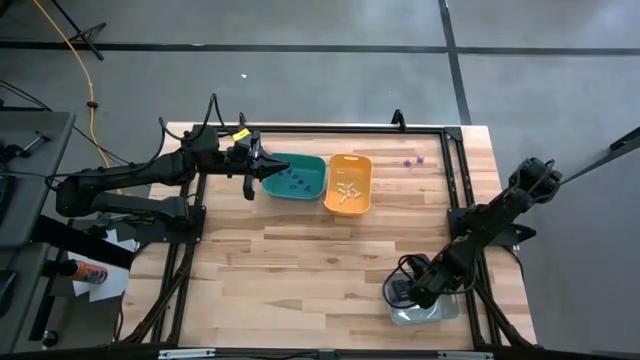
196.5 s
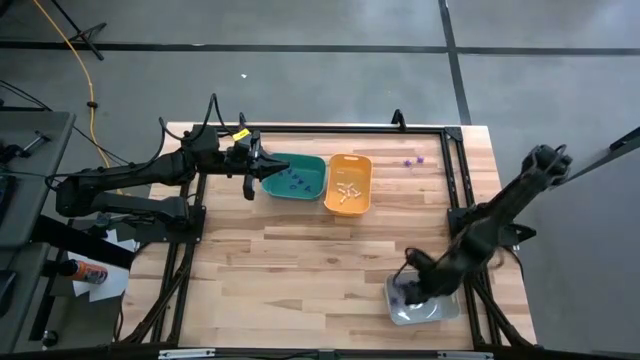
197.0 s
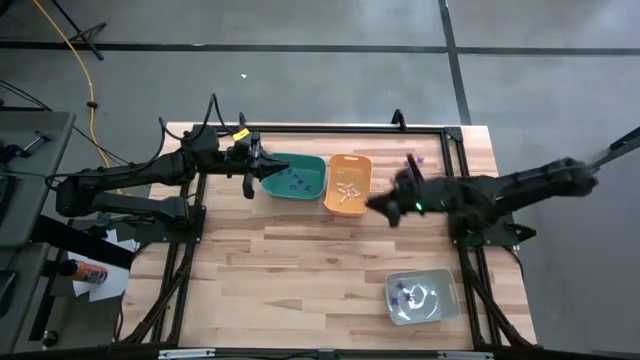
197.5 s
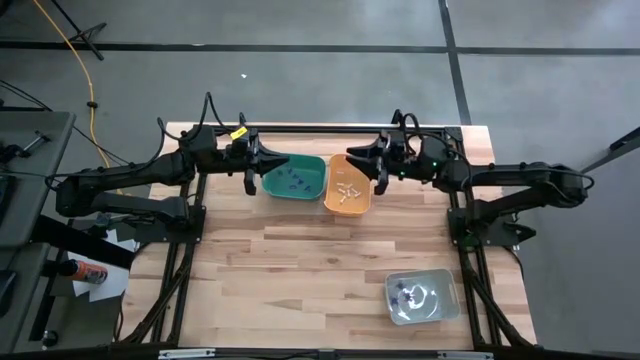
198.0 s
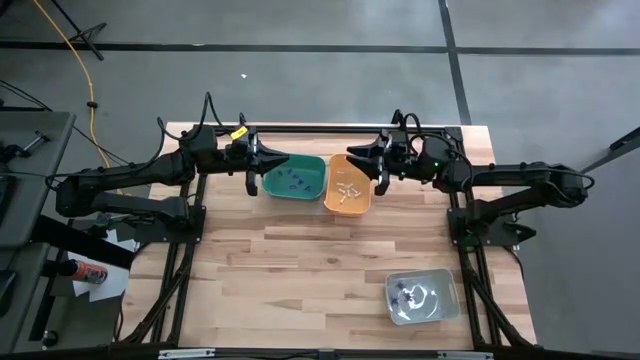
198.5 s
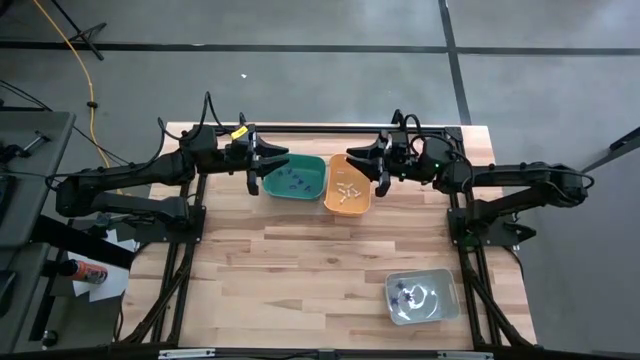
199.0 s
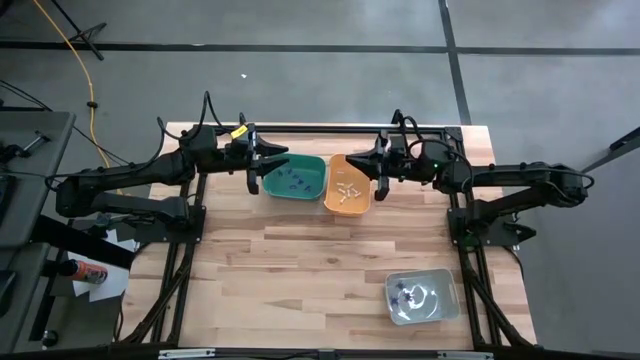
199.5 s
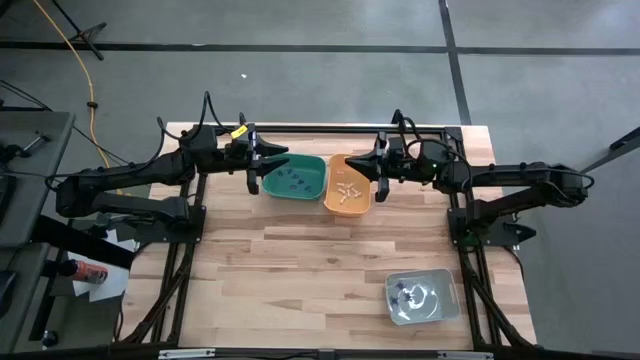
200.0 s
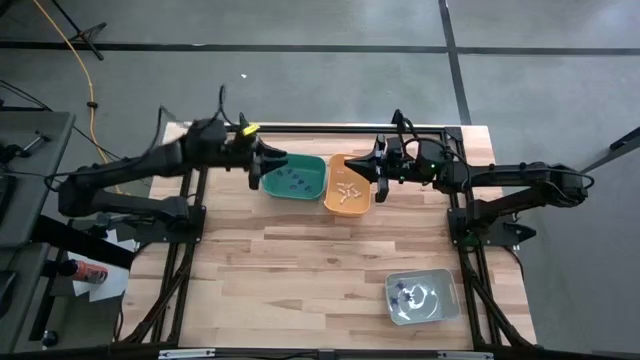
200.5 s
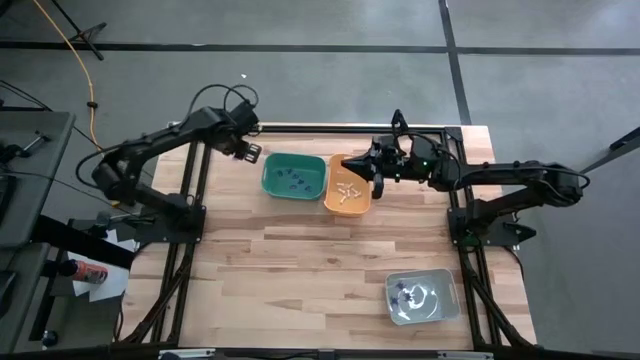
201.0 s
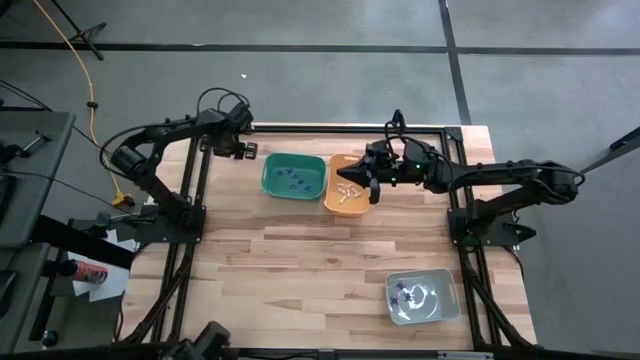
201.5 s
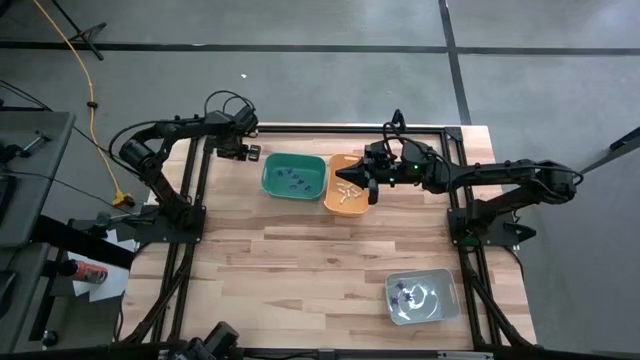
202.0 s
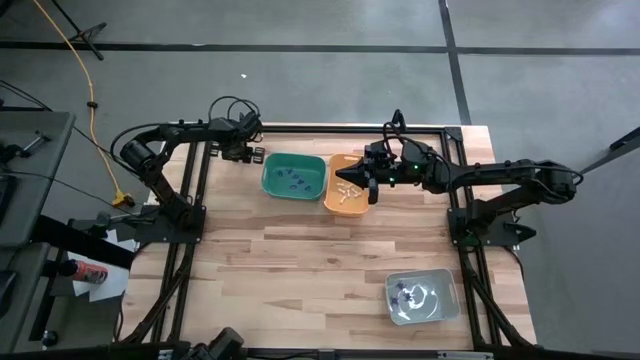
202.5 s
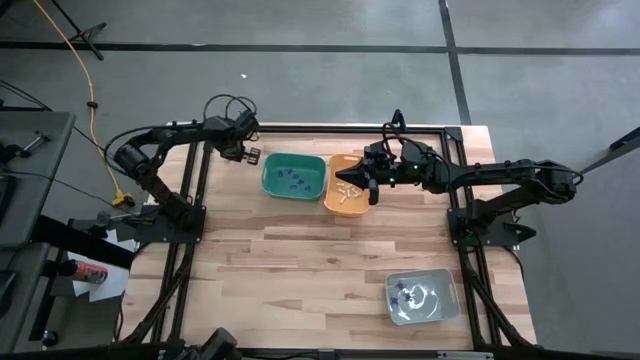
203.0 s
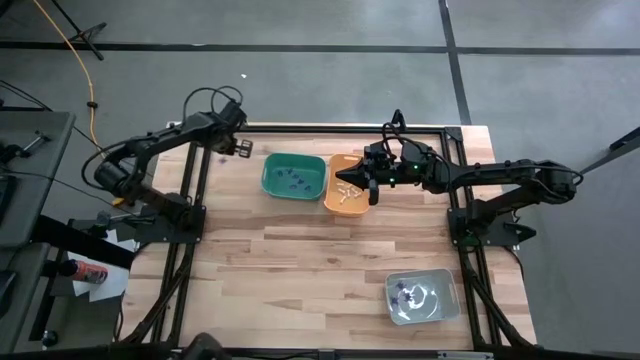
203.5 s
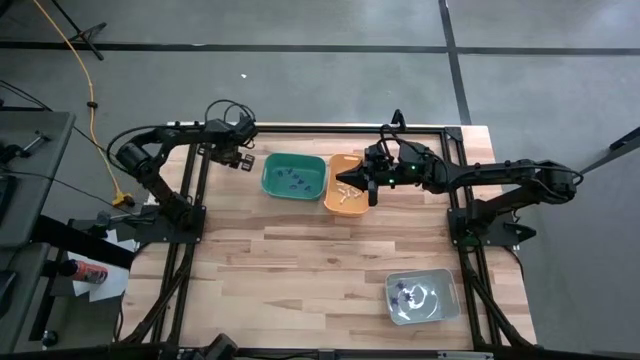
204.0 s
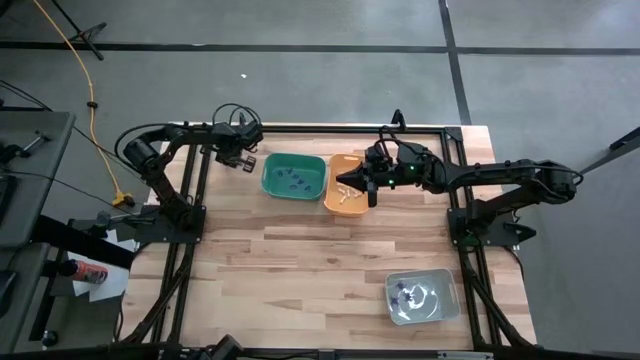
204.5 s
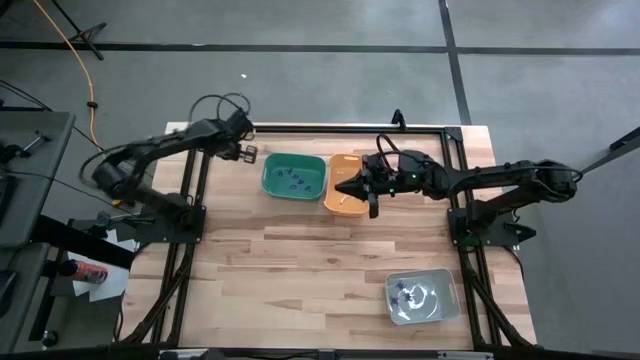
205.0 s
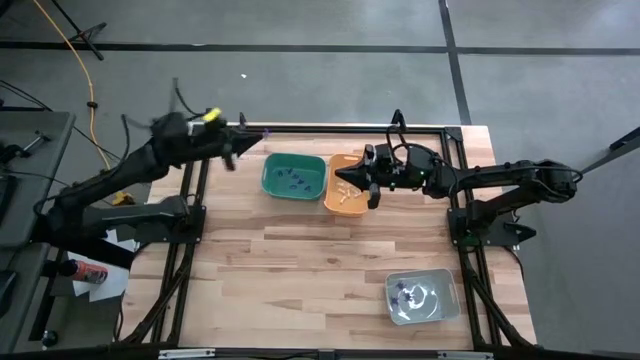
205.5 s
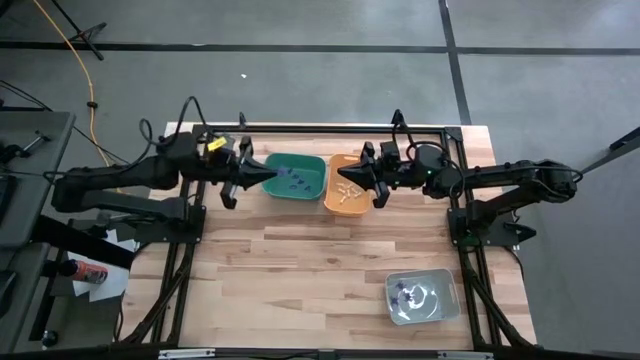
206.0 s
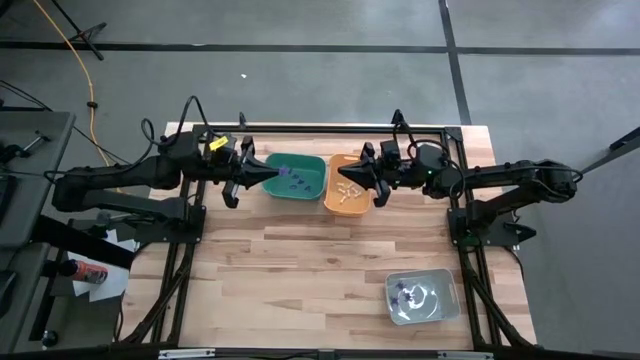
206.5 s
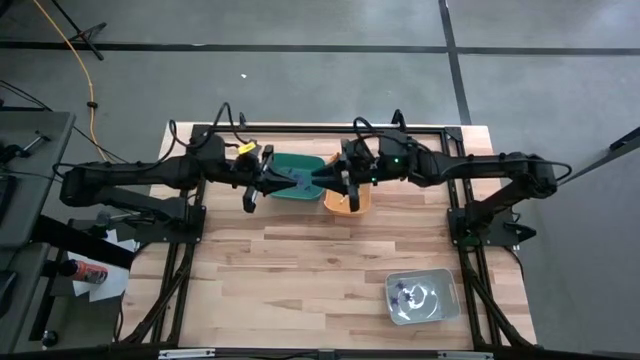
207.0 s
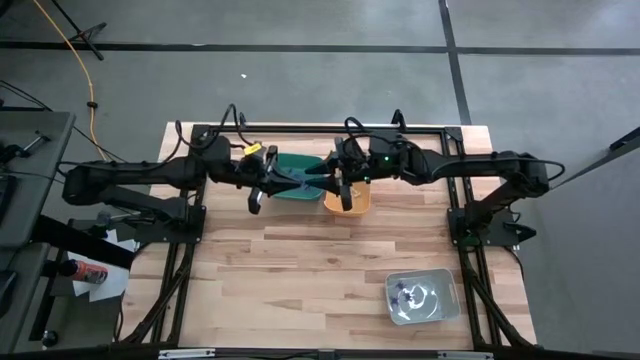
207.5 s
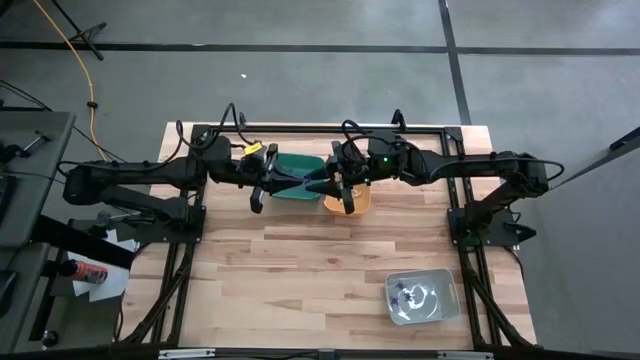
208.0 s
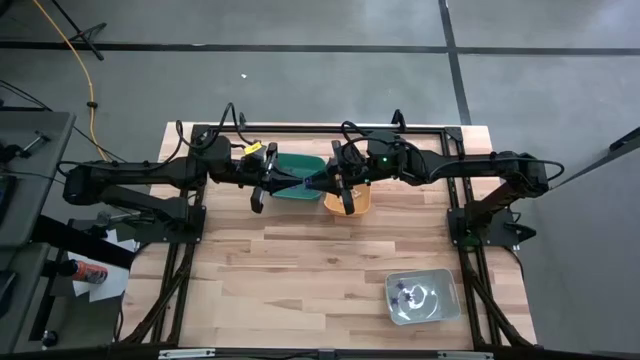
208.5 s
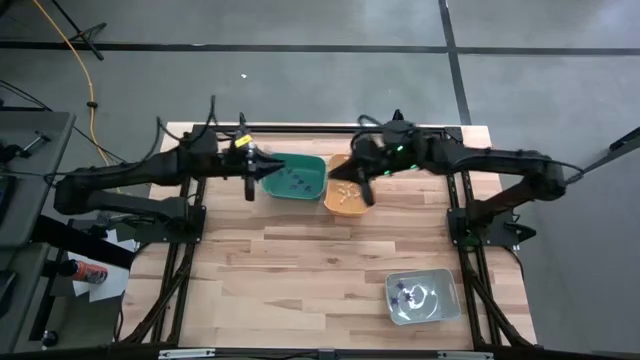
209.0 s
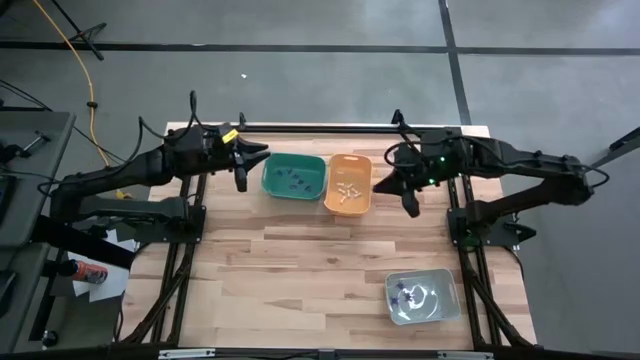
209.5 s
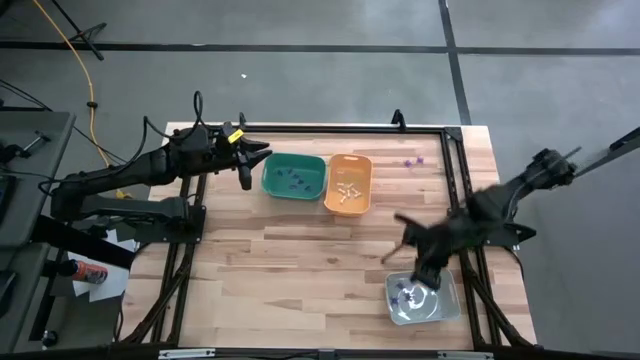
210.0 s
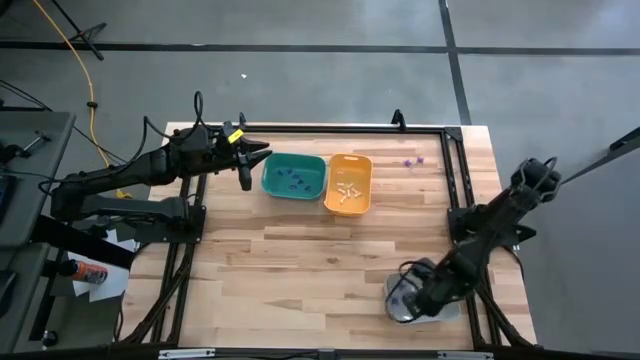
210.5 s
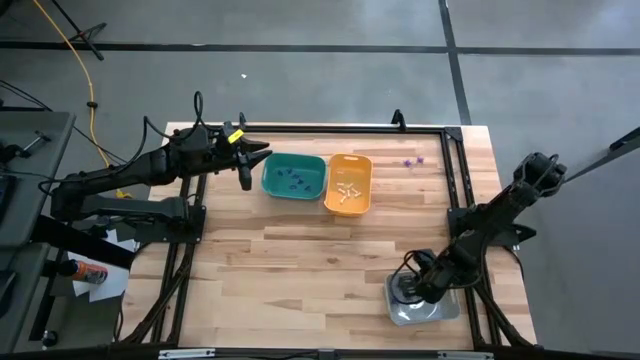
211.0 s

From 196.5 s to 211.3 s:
Task: Sort Halloween decoration
Put the violet spider toy into the gray bin

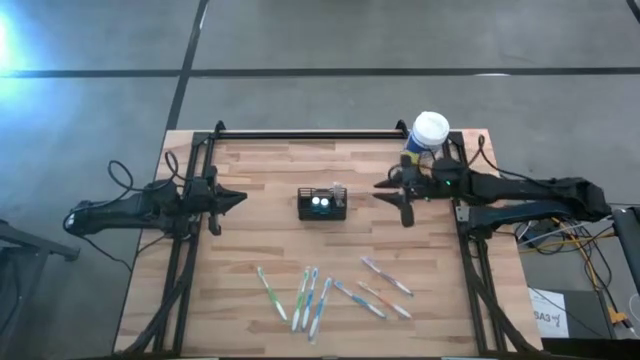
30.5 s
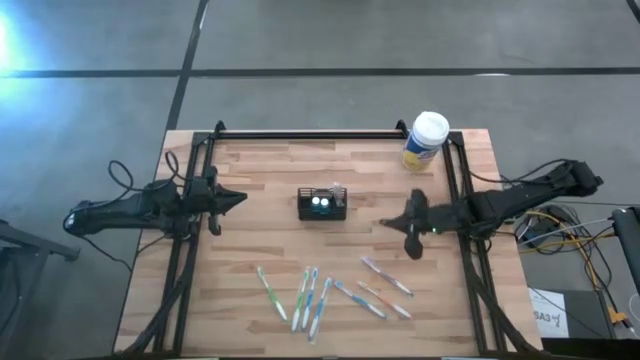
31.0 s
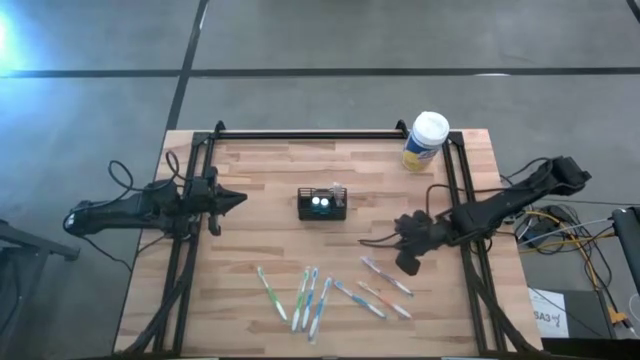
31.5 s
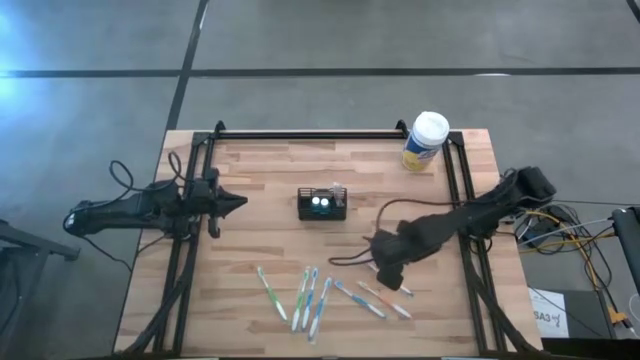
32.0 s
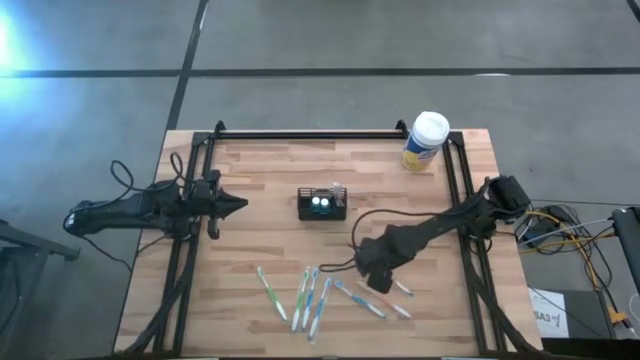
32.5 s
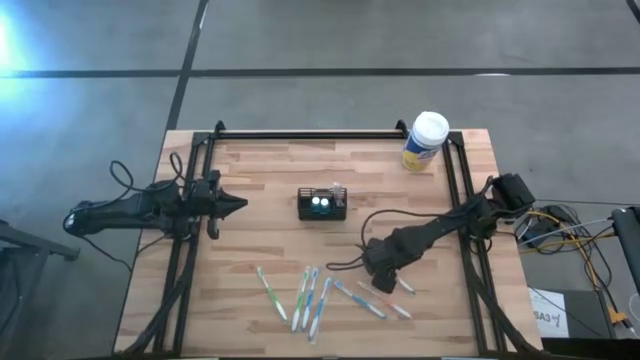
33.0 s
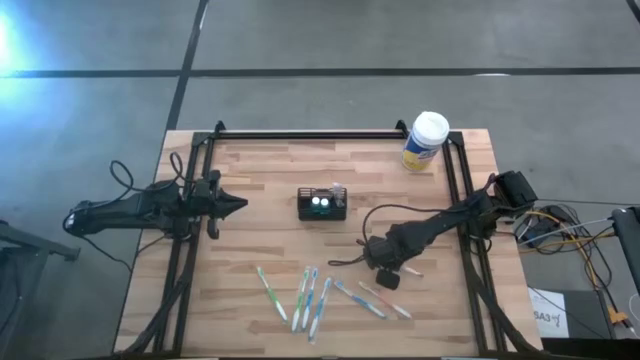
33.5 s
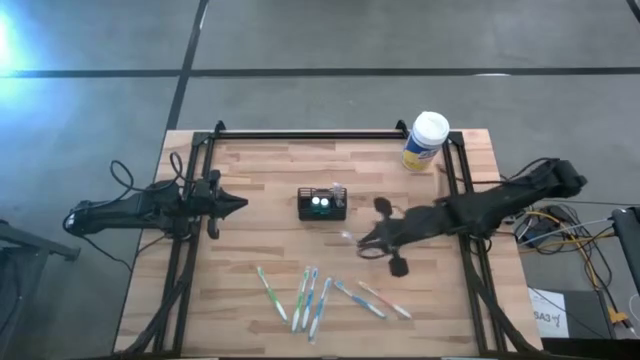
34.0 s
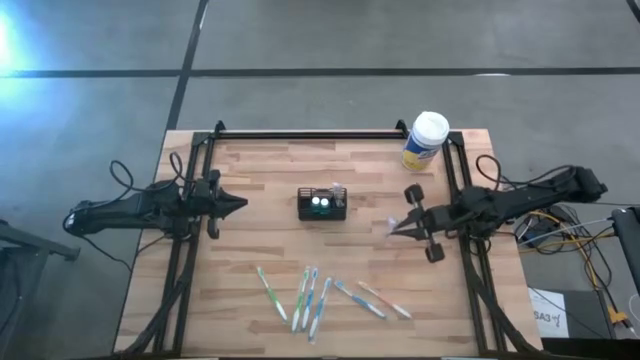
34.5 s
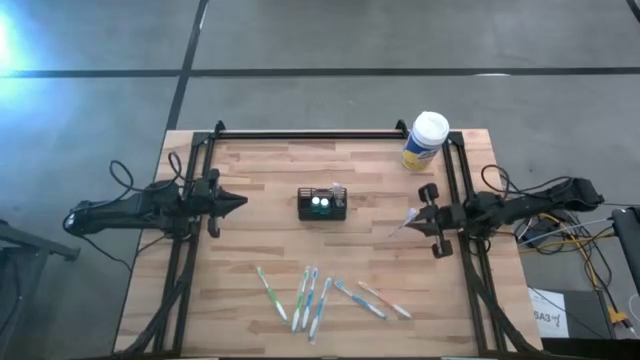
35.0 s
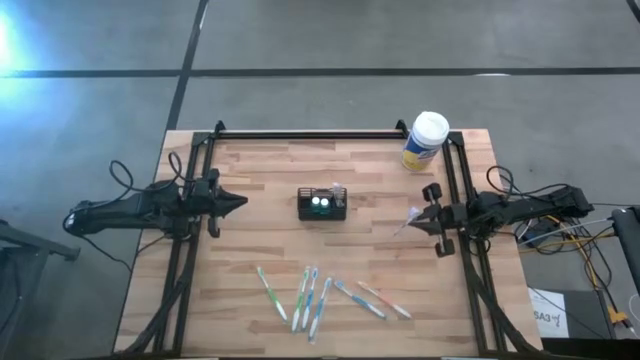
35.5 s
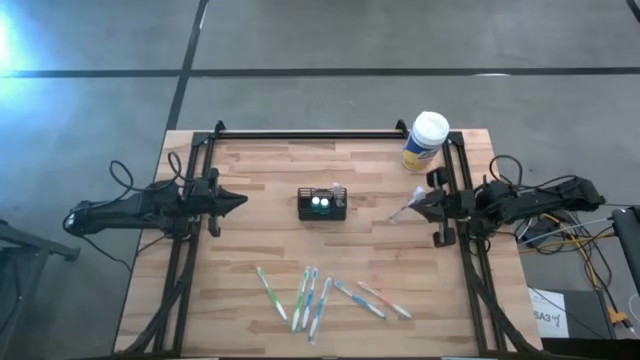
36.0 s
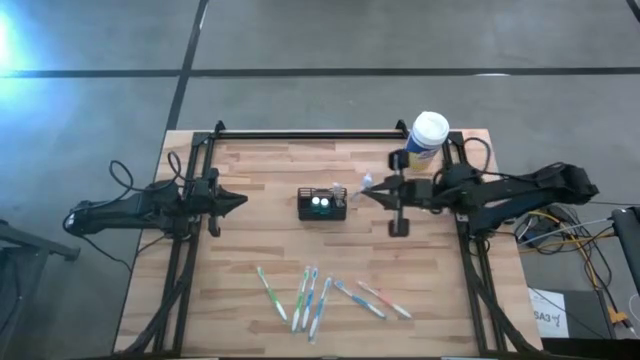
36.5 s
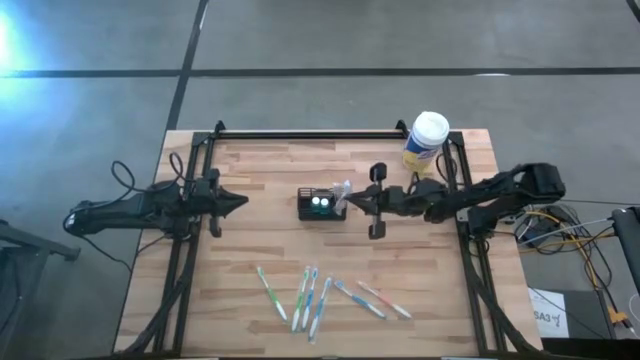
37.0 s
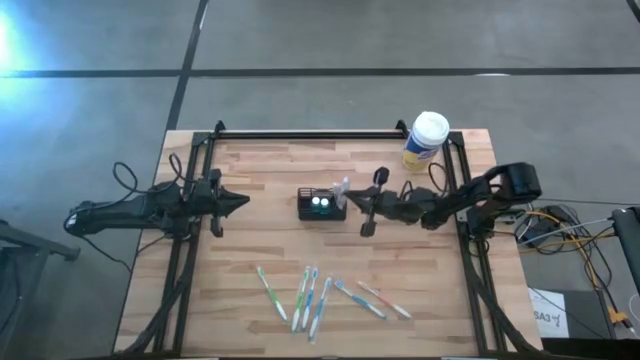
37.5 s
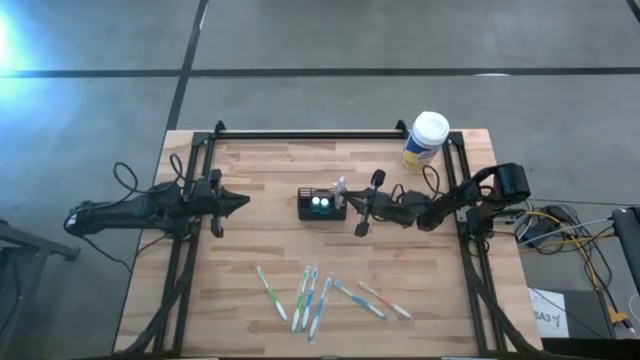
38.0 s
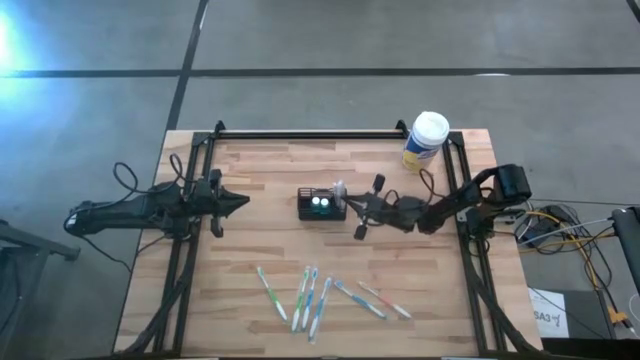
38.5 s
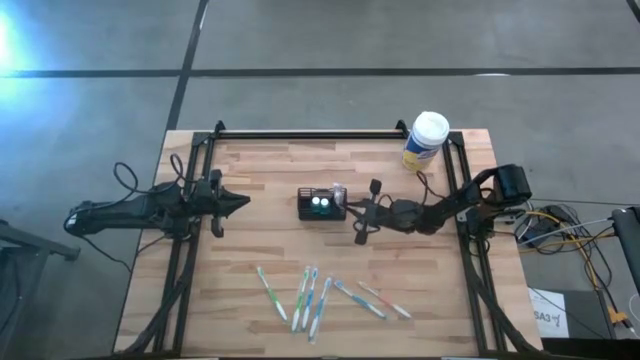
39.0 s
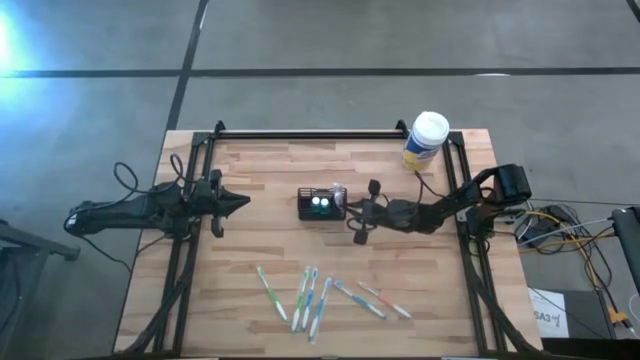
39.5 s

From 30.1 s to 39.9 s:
Task: Pick & Place toothbrushing station
Put the purple toothbrush in the wire organizer
